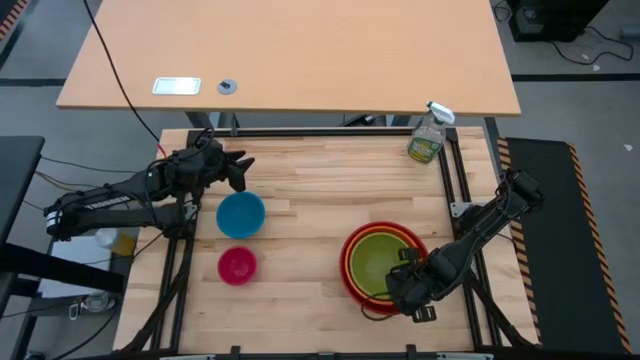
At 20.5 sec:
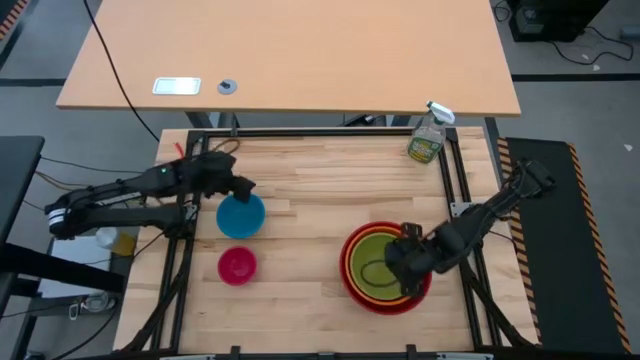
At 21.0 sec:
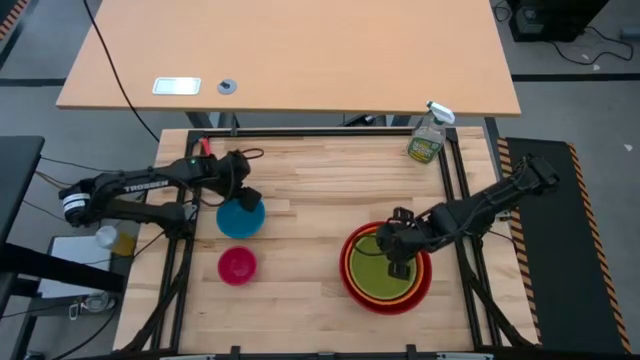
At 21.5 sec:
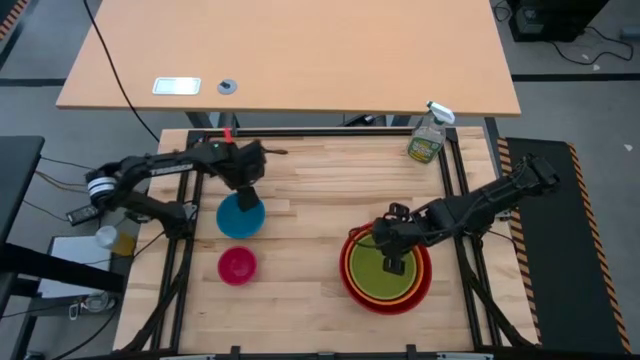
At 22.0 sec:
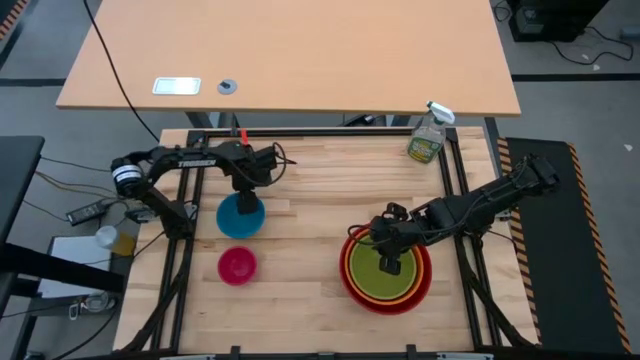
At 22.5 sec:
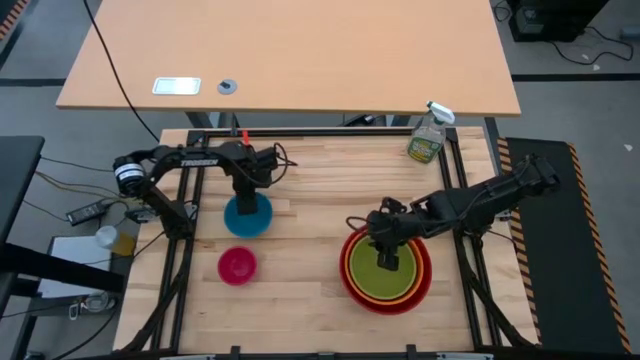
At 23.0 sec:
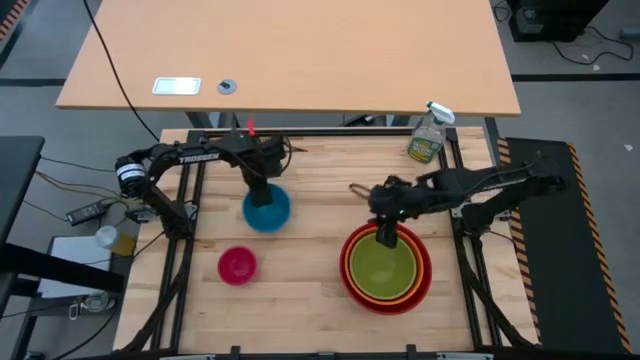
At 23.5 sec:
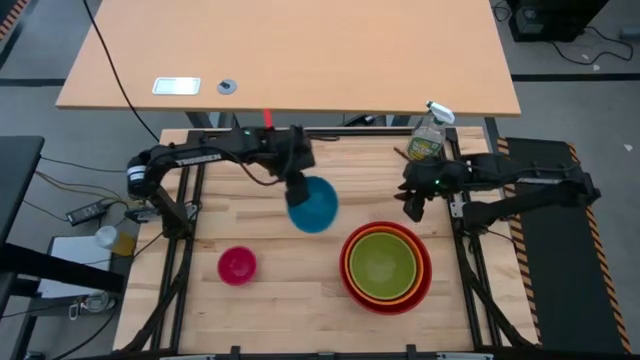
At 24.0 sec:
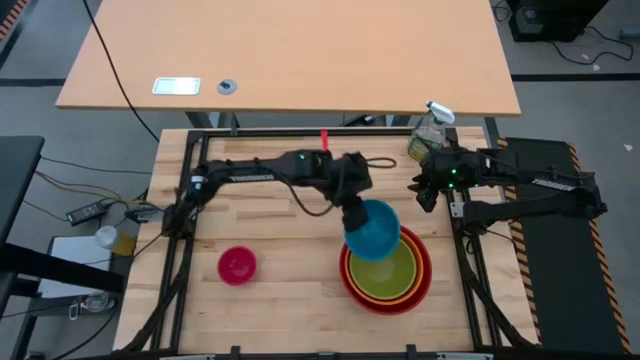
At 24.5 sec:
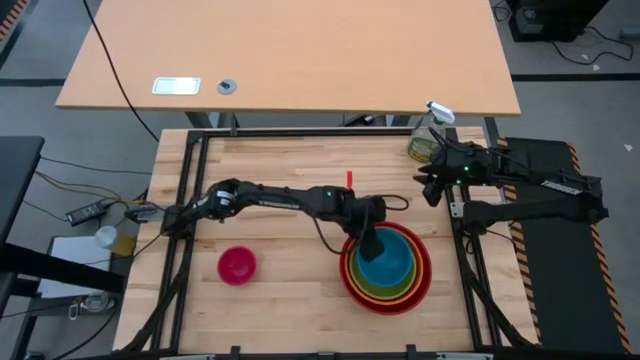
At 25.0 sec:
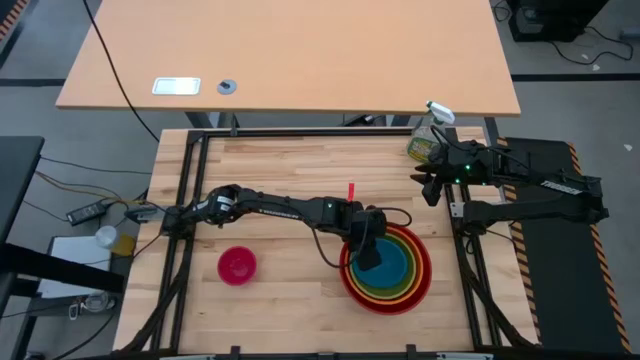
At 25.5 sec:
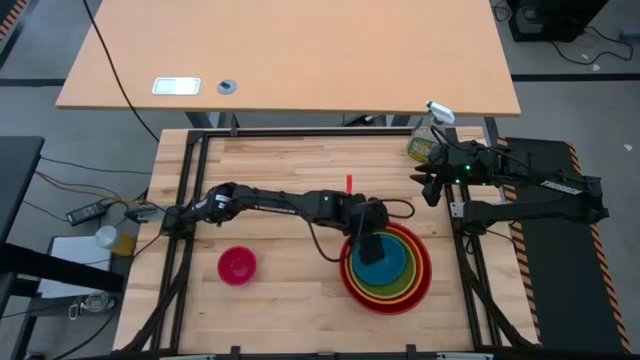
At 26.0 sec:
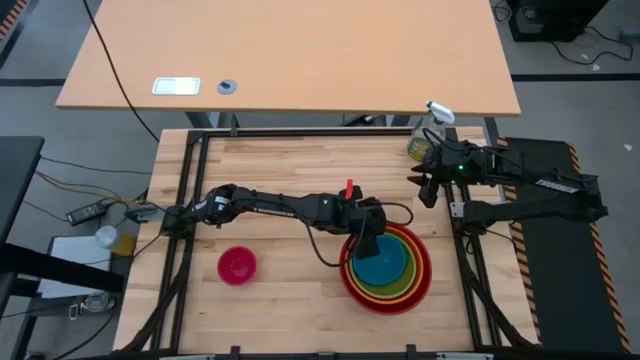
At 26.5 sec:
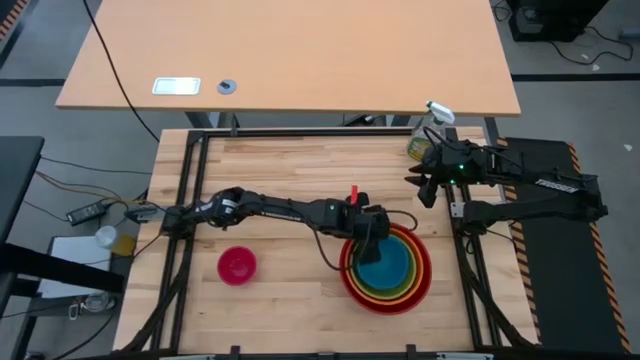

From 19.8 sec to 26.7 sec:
Stack the blue bowl on top of the green bowl

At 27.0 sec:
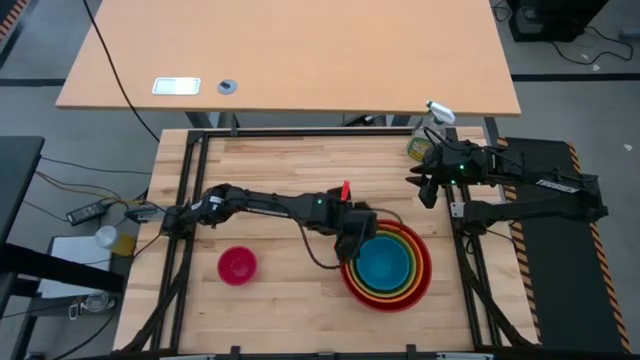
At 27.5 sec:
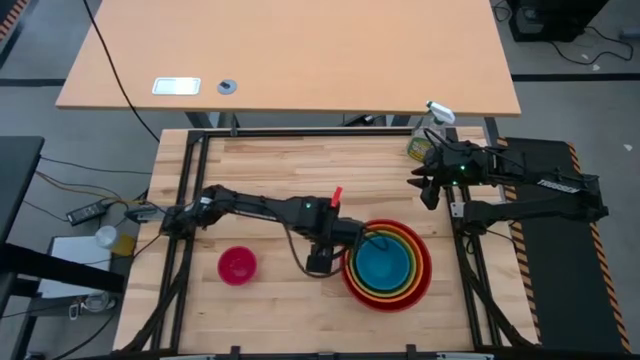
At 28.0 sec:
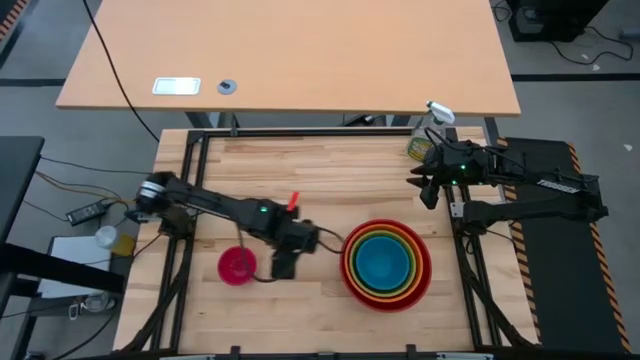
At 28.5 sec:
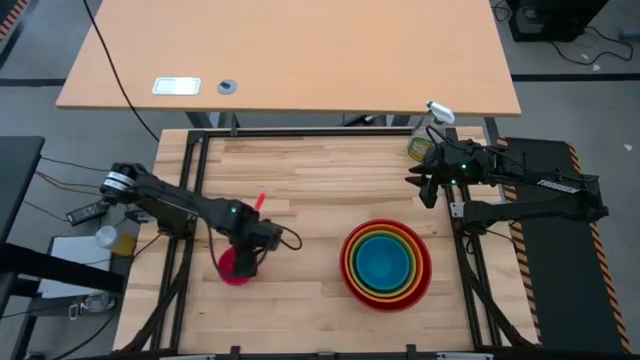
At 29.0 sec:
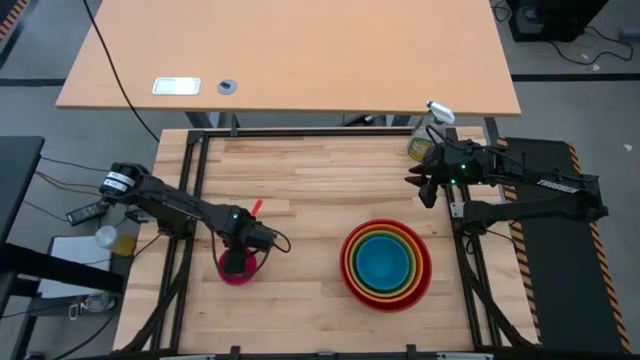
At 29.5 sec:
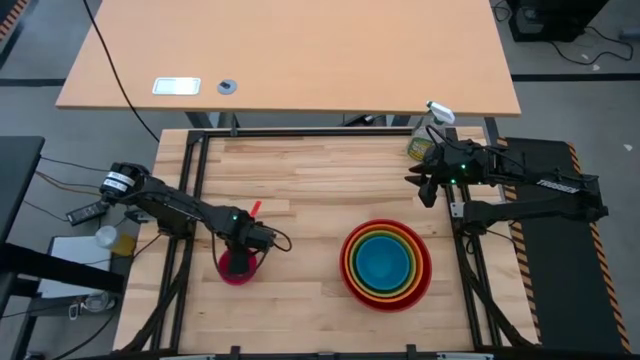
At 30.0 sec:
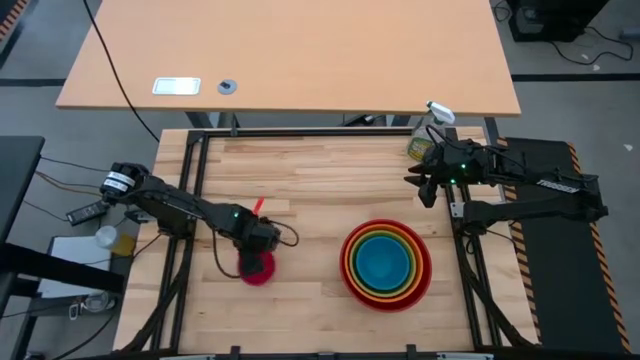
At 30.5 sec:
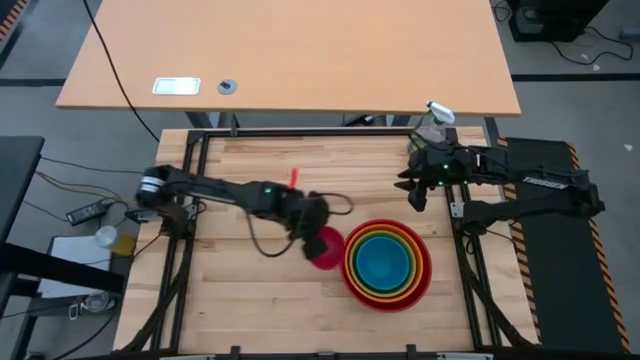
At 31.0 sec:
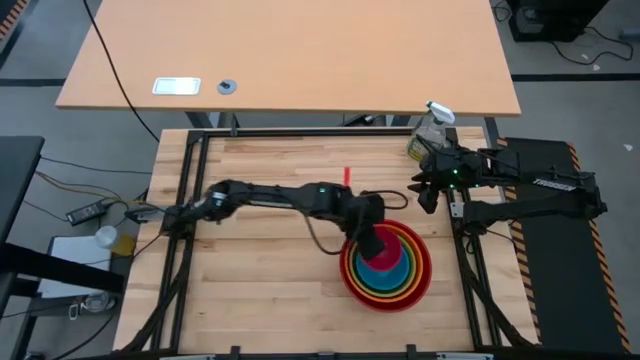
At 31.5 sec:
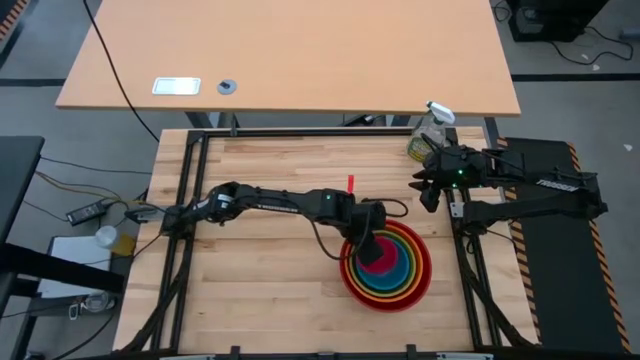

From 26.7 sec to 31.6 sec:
Stack the pink bowl on top of the blue bowl

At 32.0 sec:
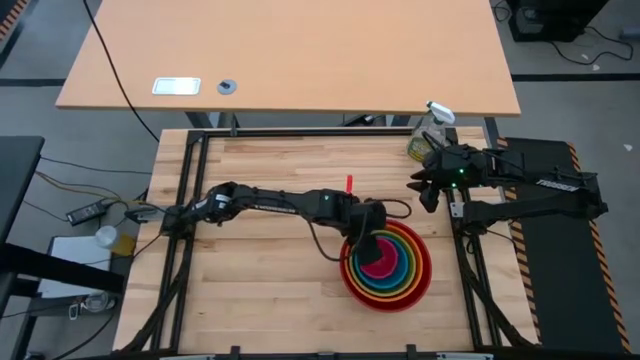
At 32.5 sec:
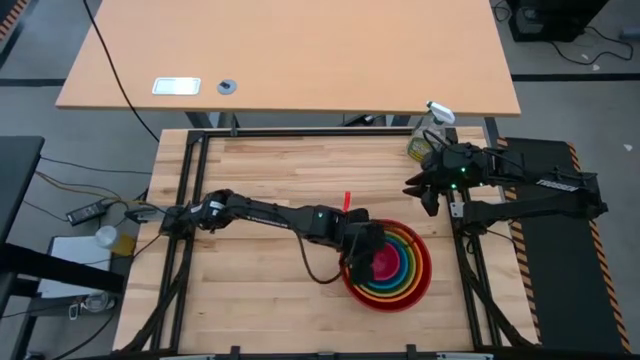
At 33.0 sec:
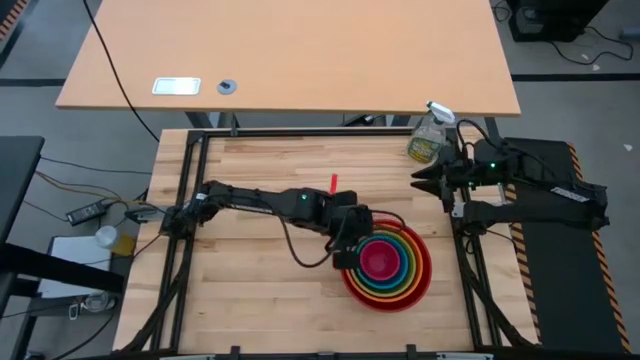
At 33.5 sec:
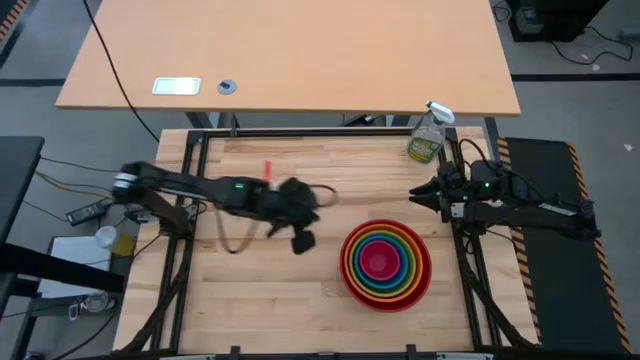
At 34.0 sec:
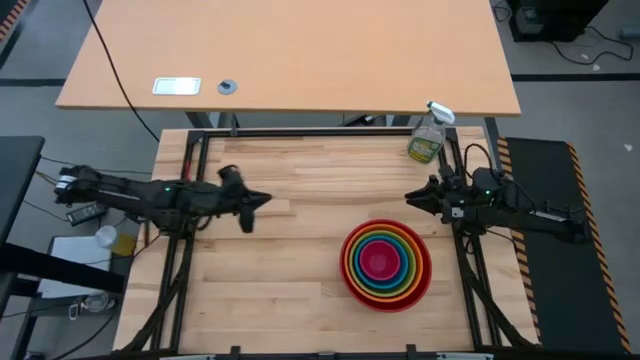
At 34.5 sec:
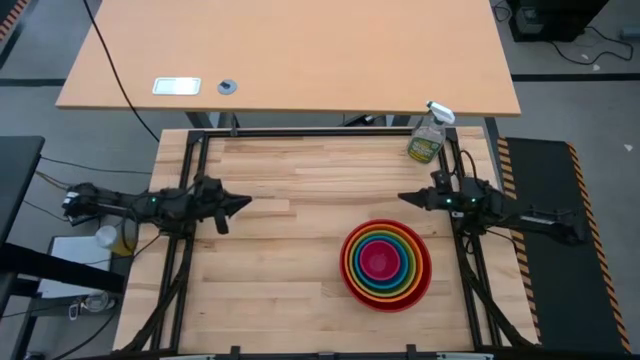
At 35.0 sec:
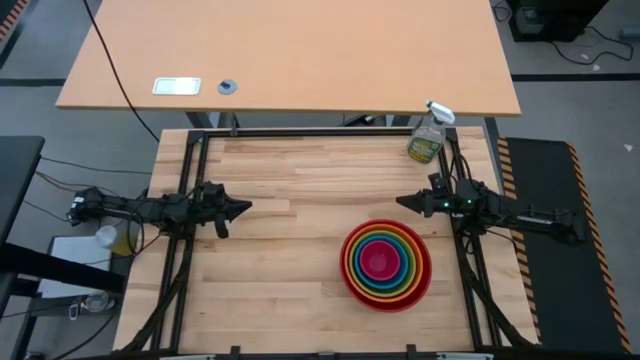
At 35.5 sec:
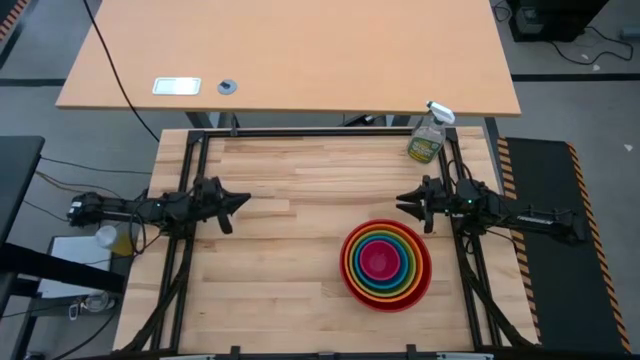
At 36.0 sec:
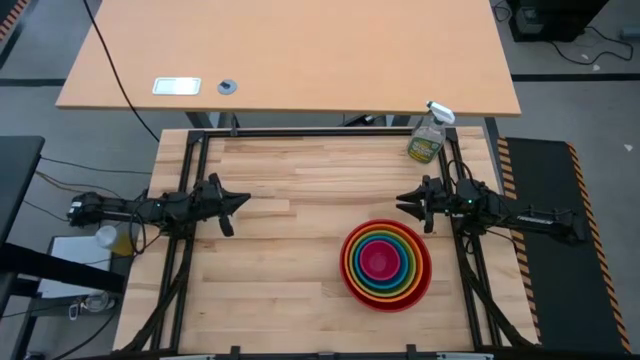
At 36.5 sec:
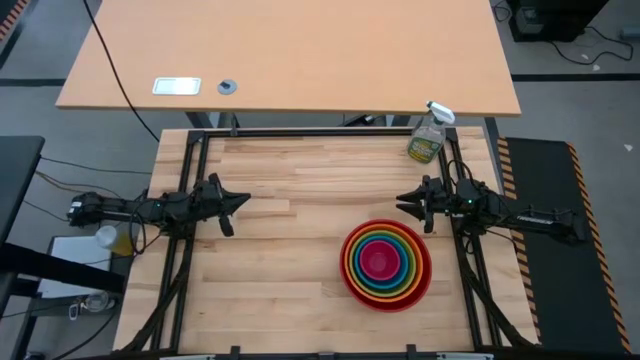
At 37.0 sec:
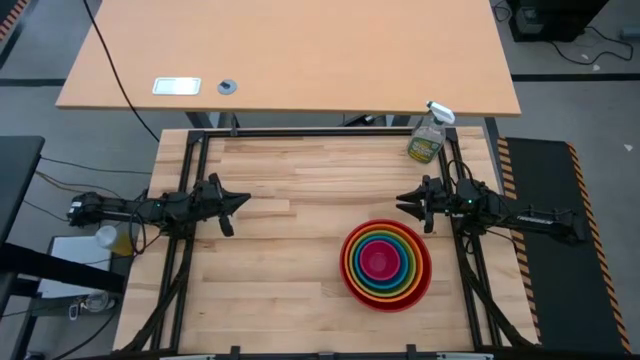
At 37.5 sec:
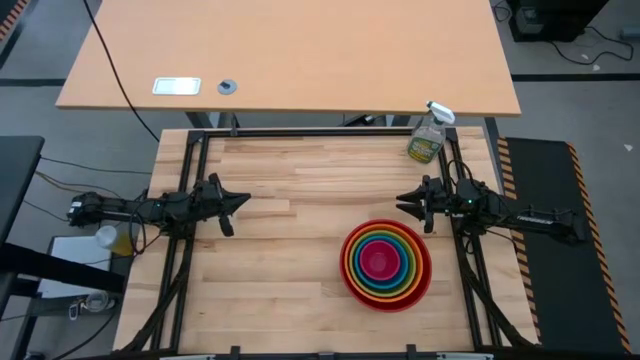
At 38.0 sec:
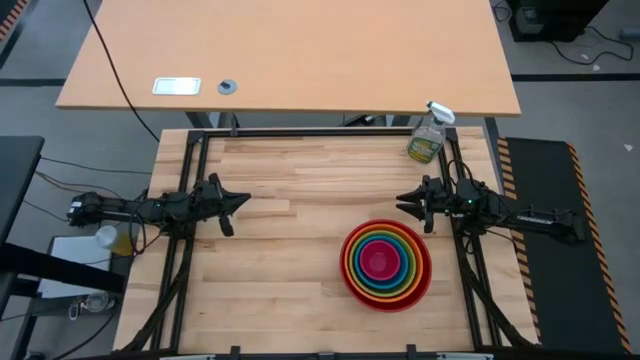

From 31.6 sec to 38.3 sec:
Return to Home Position
